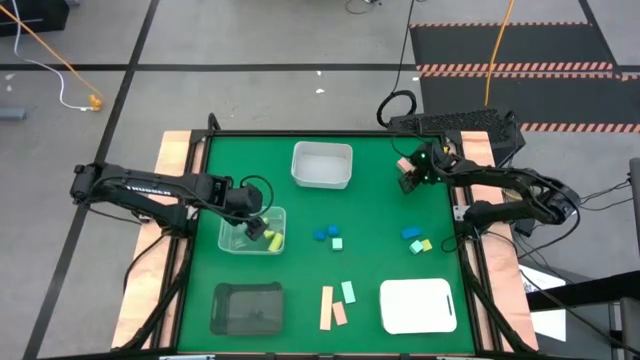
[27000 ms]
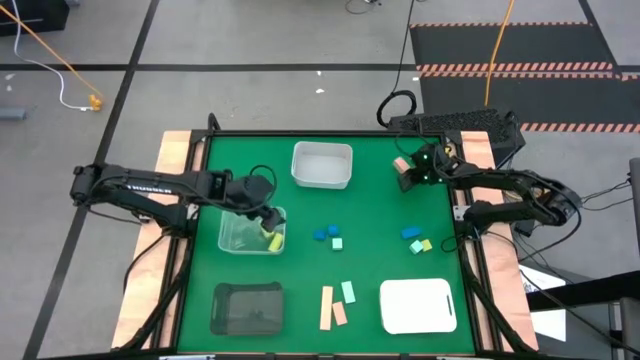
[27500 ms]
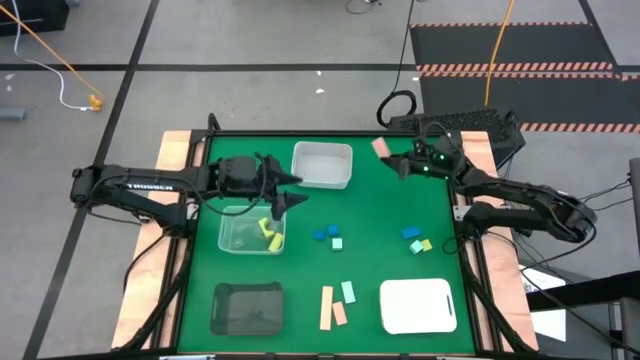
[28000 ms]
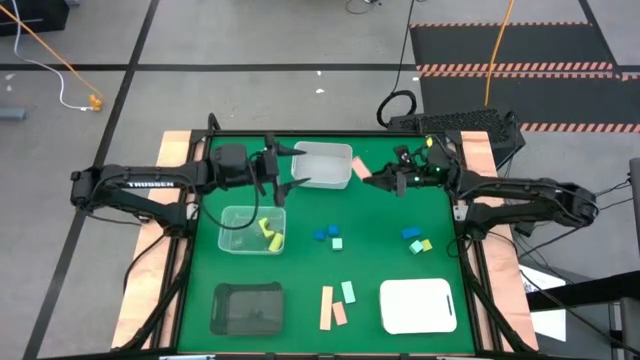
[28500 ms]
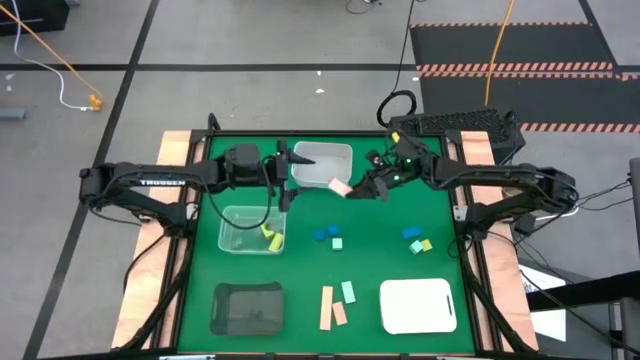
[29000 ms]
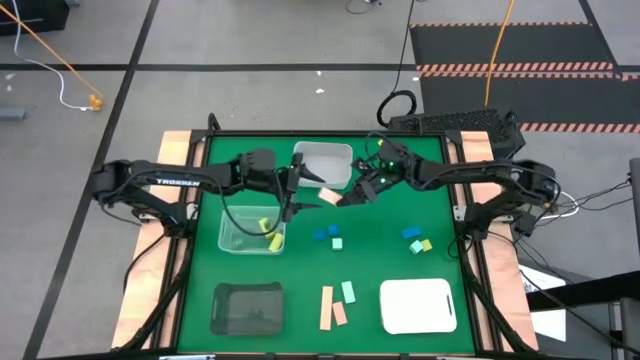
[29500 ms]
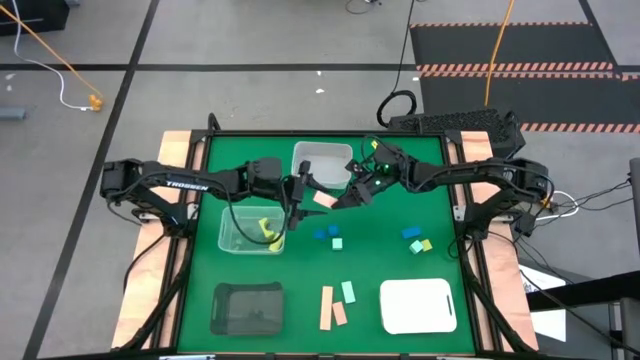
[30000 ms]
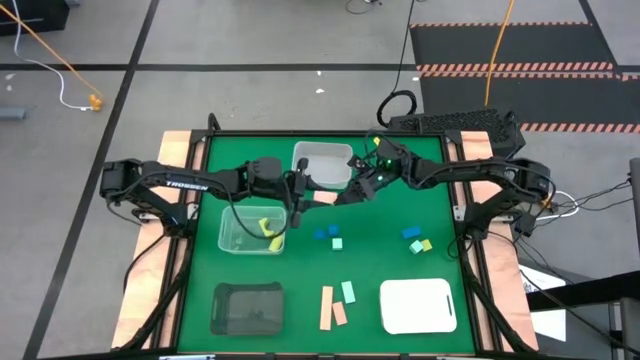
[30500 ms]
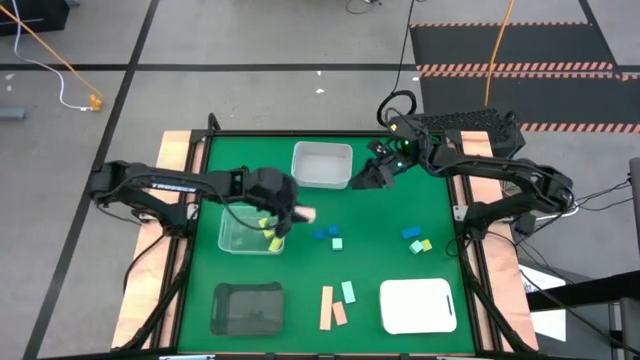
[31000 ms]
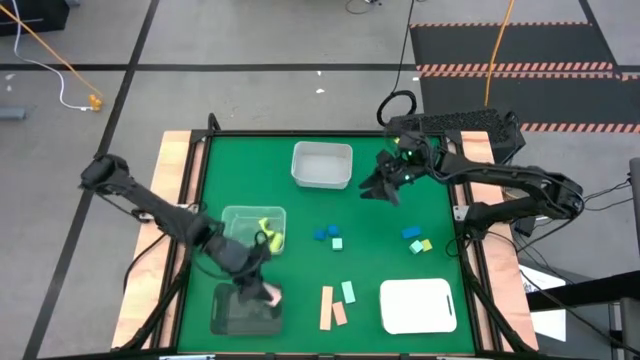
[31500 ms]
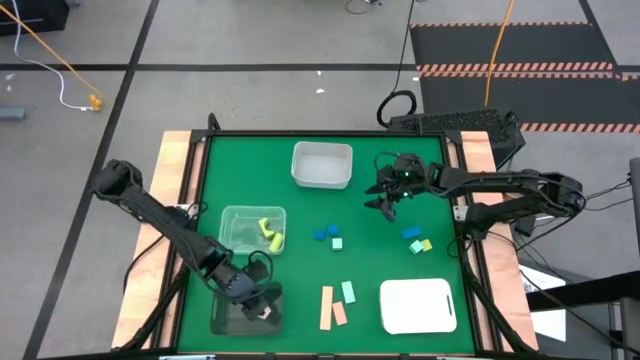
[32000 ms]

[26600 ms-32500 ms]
Task: Sort & place blocks by color
Put the top right brown rectangular block into the black bin

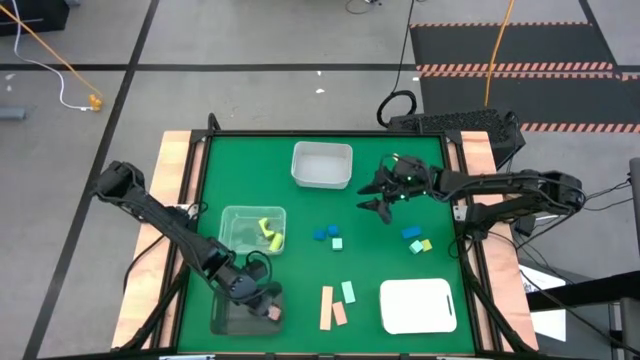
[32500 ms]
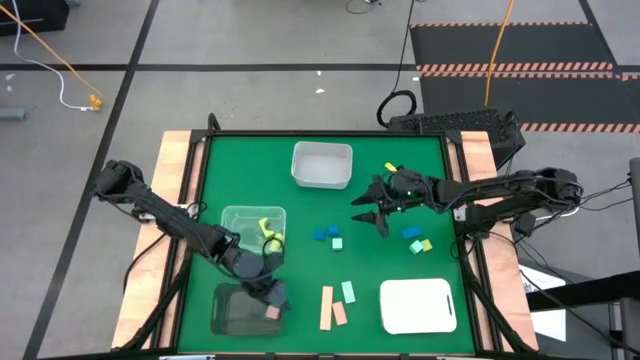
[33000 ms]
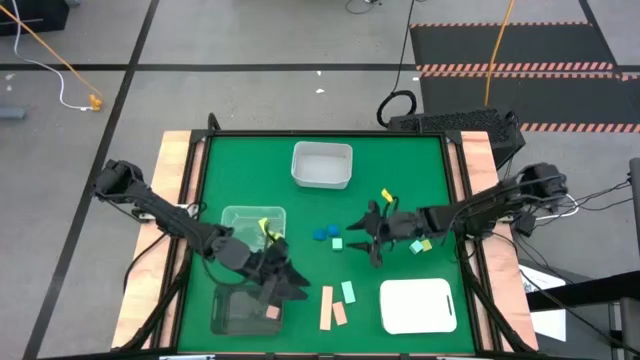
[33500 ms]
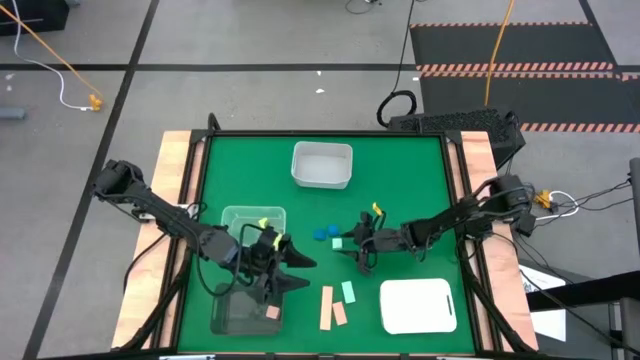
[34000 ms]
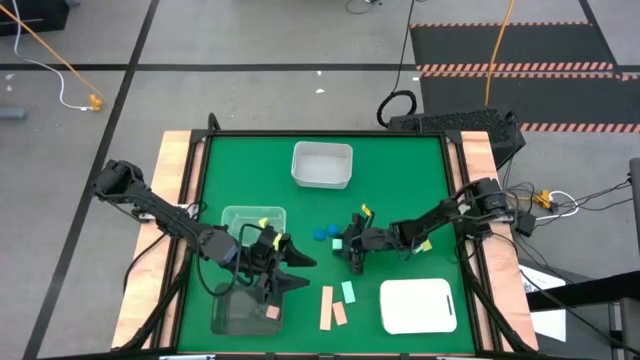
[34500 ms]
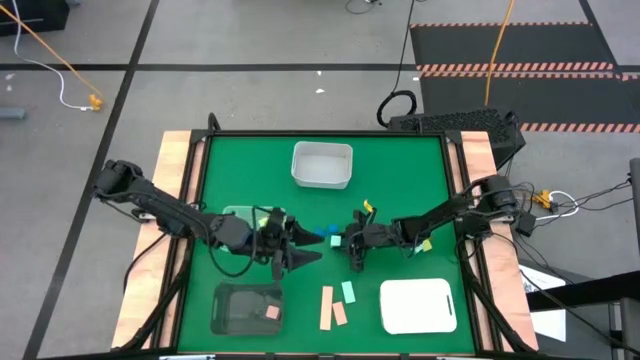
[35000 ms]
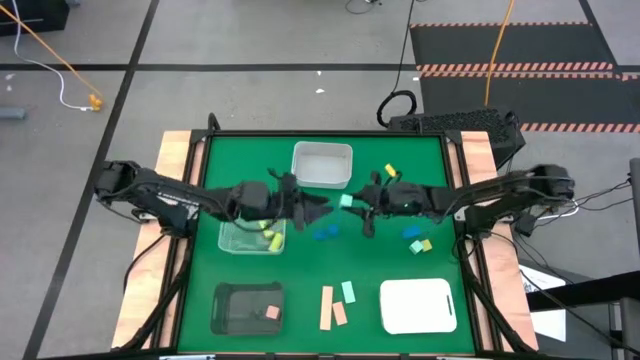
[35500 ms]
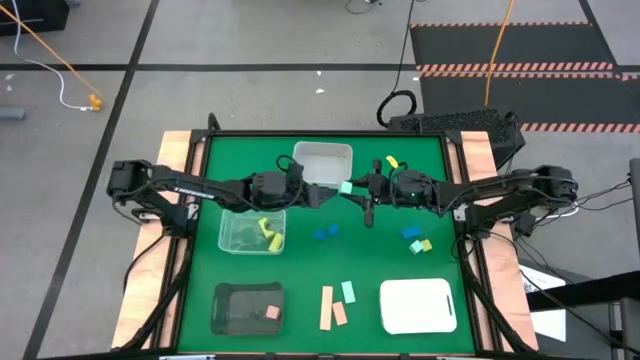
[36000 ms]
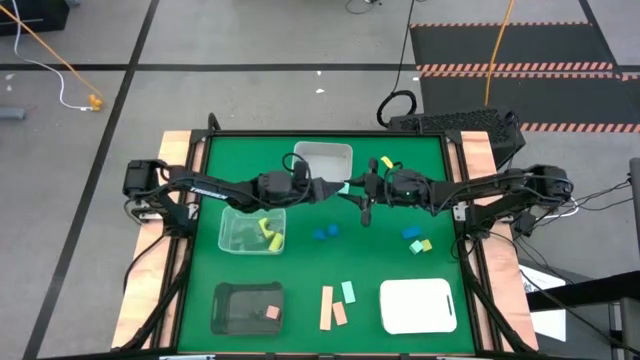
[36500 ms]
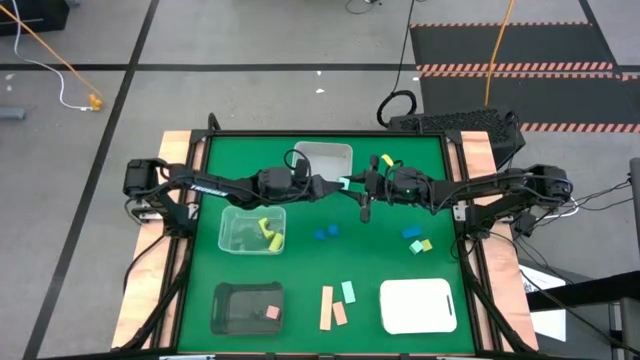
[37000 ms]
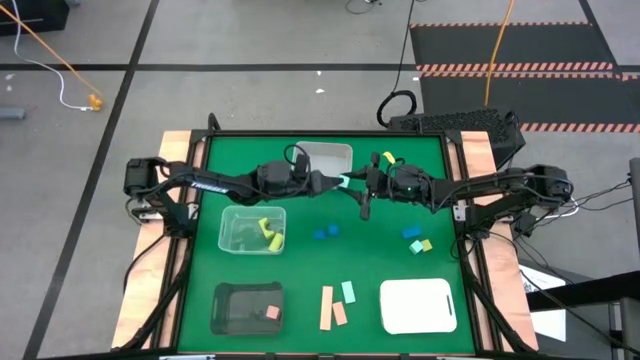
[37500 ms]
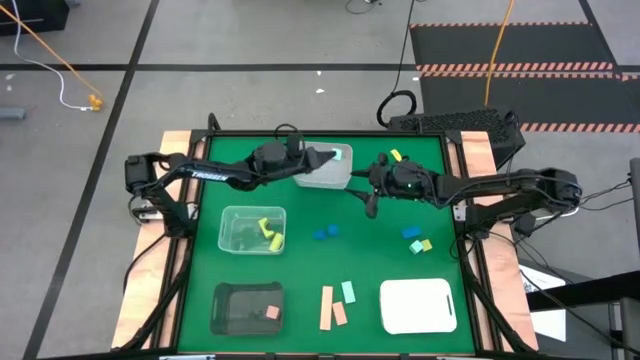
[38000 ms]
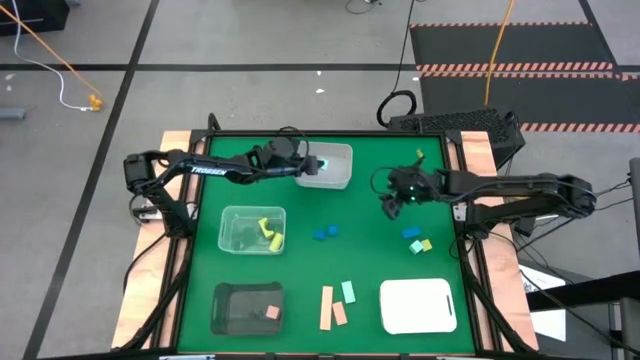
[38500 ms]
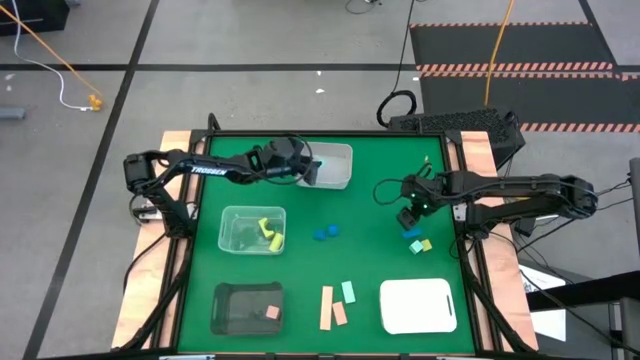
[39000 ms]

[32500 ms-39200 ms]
Put the center light blue square block into the top white bin

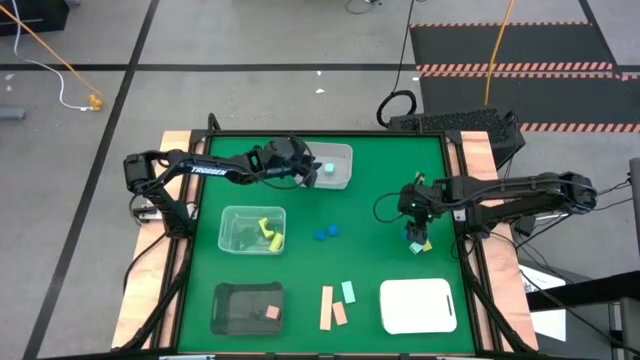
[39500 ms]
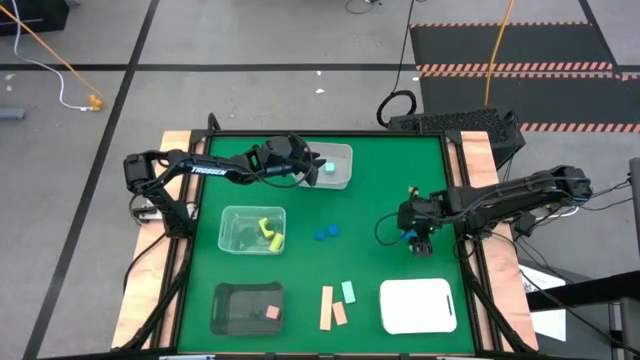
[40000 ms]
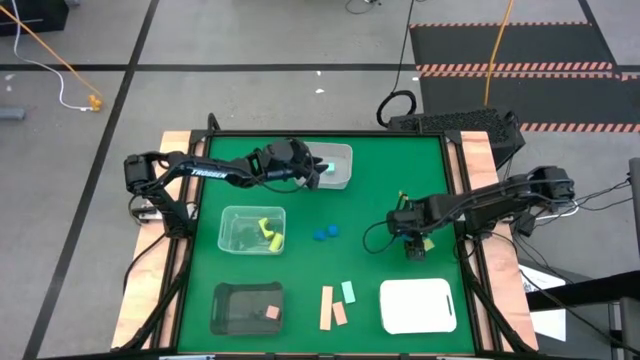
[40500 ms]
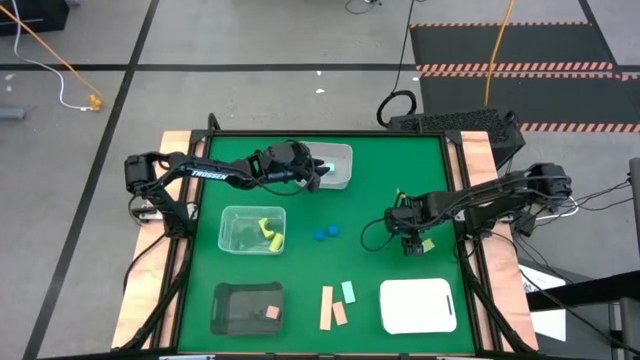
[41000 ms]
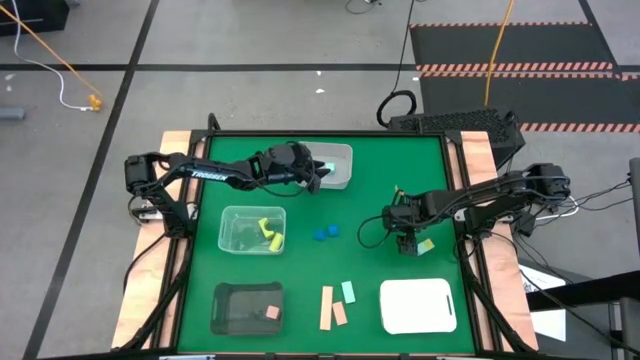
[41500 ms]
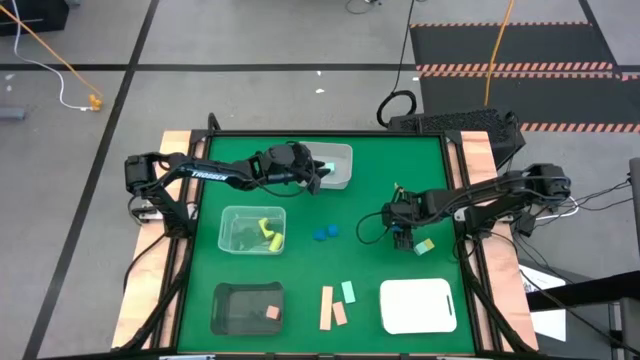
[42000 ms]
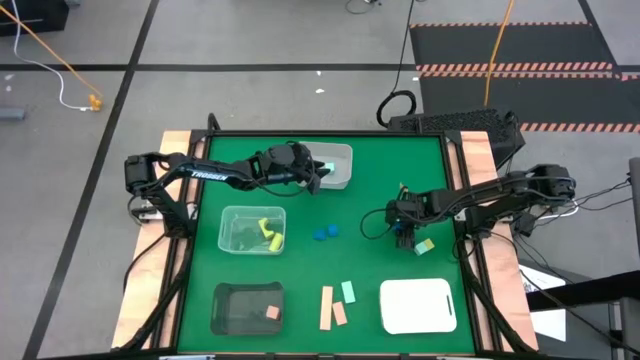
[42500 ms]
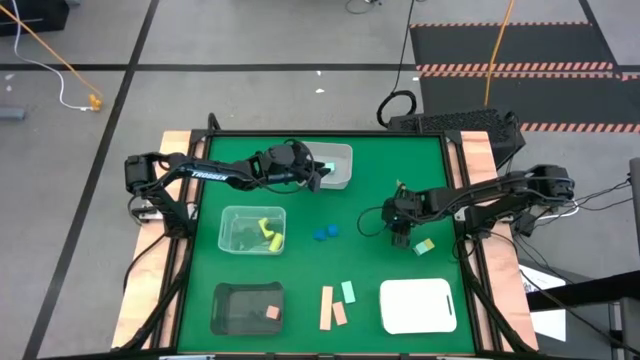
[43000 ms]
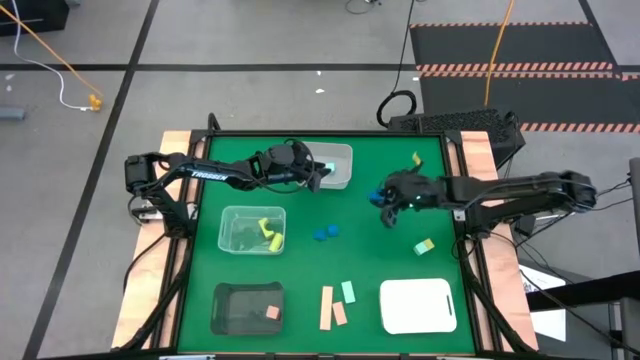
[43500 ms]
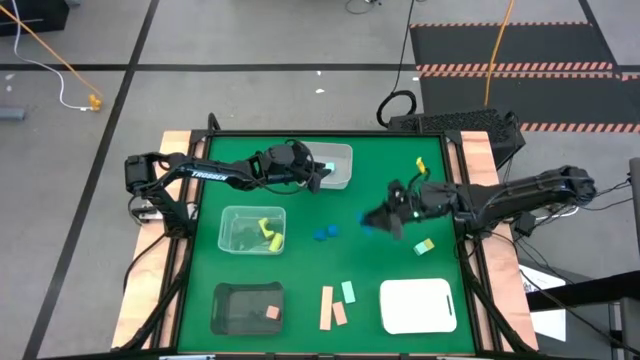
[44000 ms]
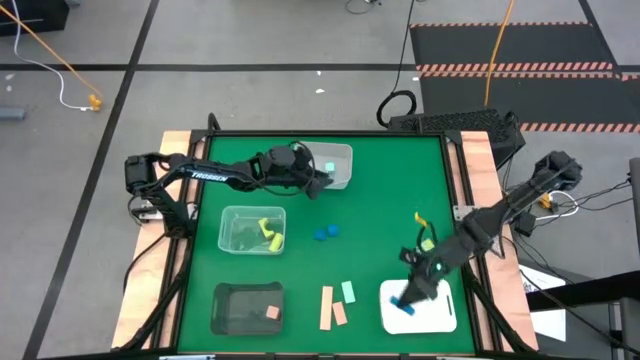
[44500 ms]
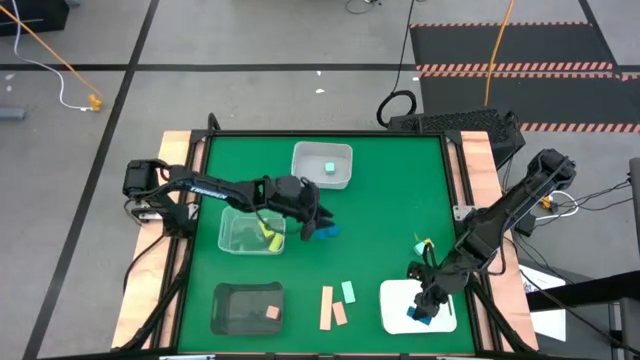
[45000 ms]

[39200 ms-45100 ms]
Put the right blue rectangular block into the bottom white bin

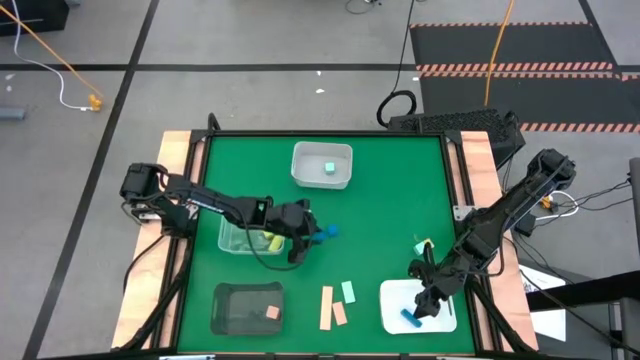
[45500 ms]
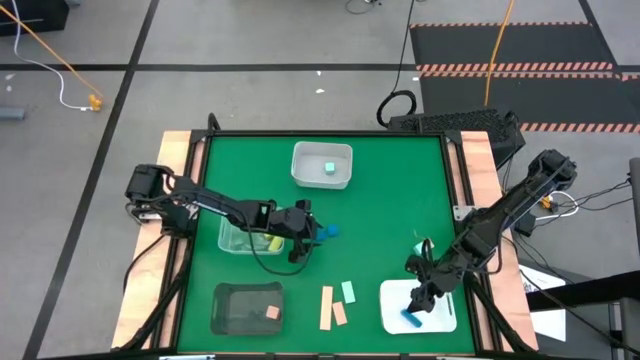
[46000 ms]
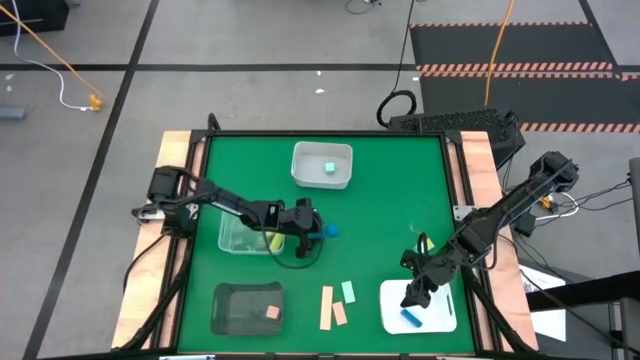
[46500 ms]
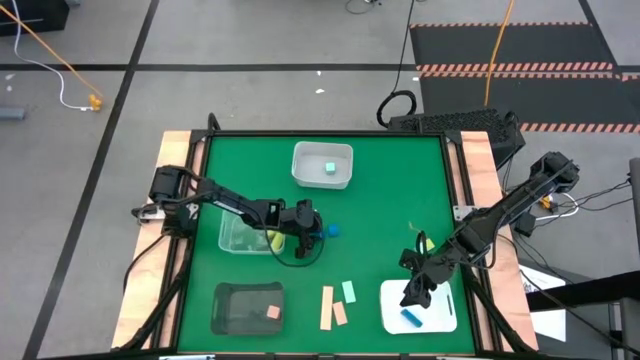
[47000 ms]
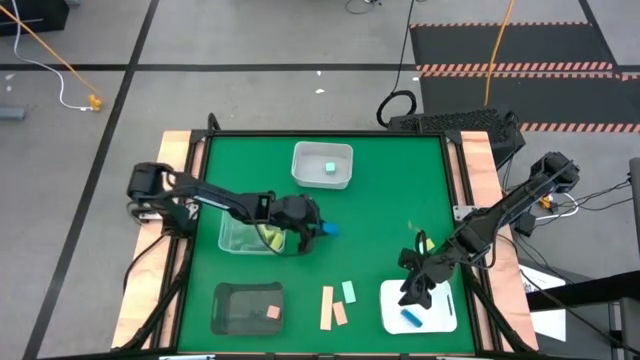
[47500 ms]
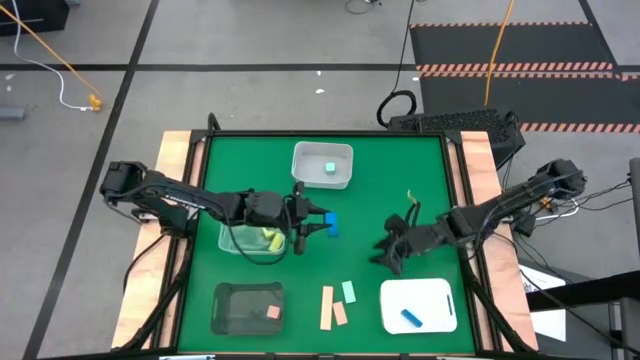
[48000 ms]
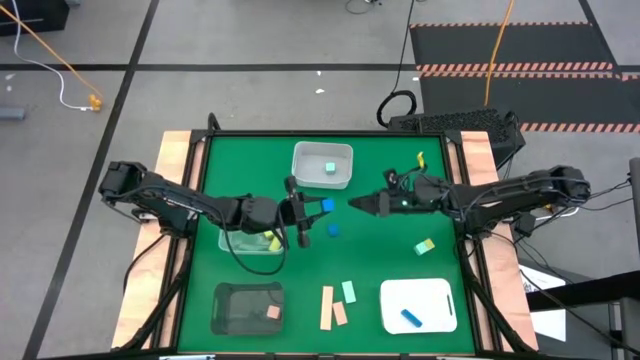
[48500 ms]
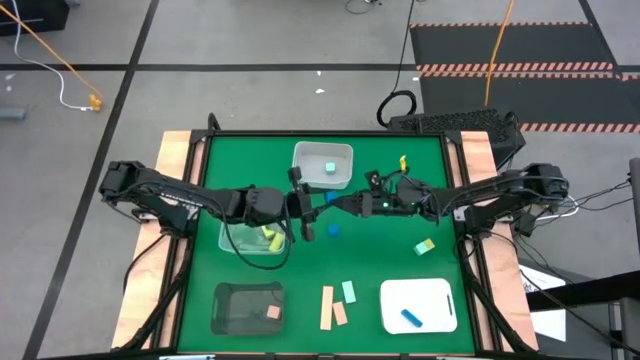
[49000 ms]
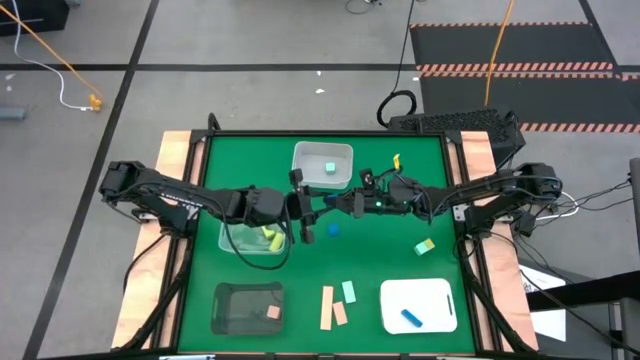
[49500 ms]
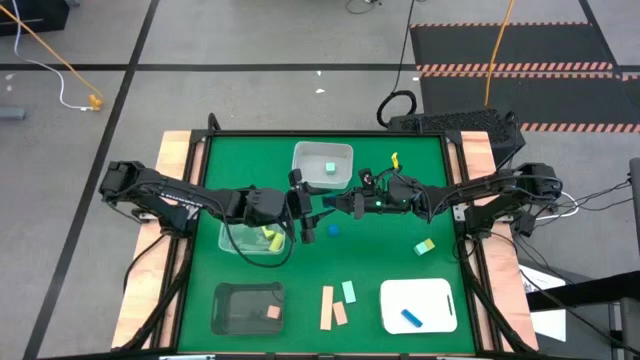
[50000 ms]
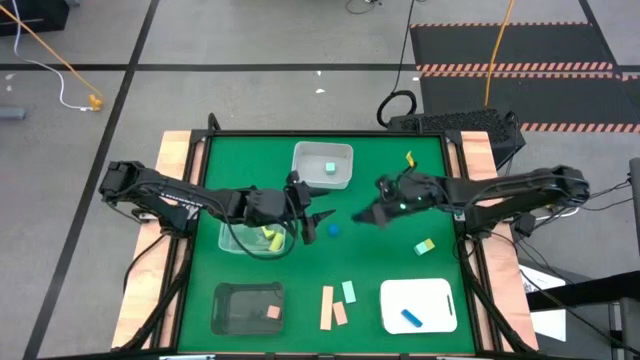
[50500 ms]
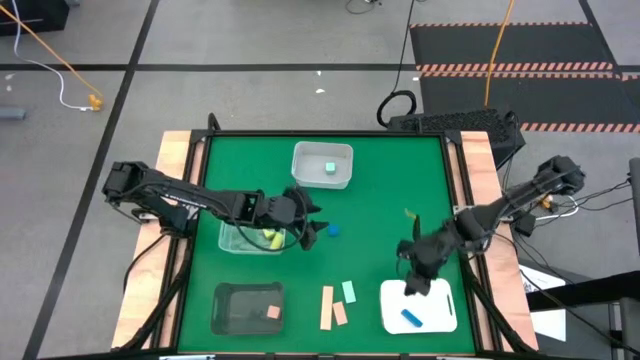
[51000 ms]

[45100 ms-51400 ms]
Put the left blue triangle block into the bottom white bin
